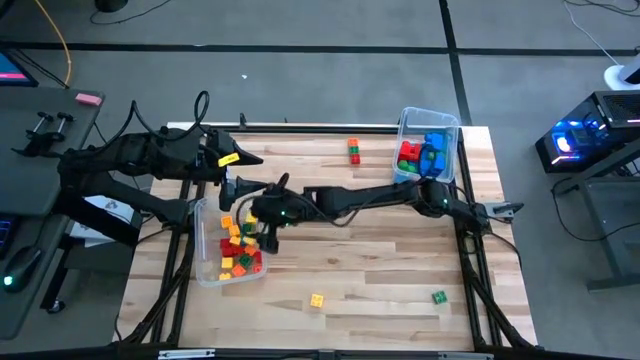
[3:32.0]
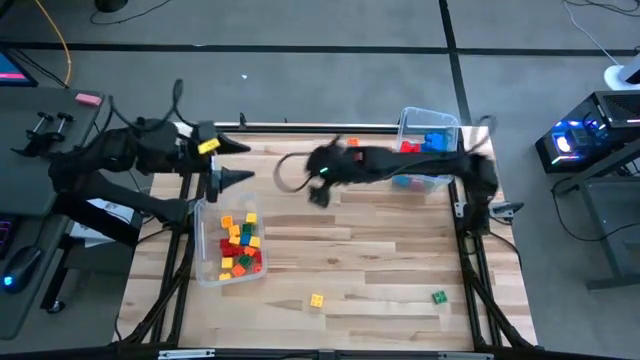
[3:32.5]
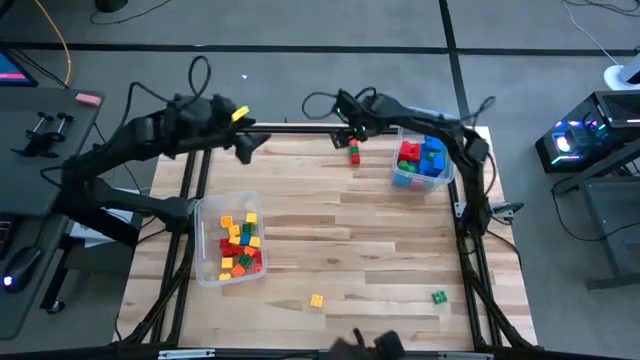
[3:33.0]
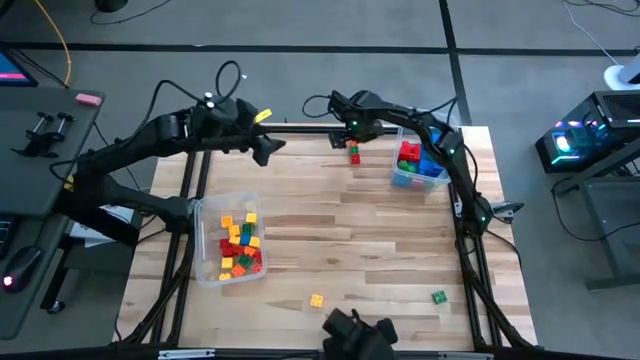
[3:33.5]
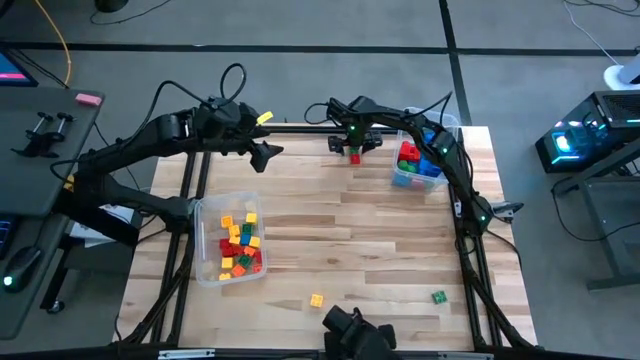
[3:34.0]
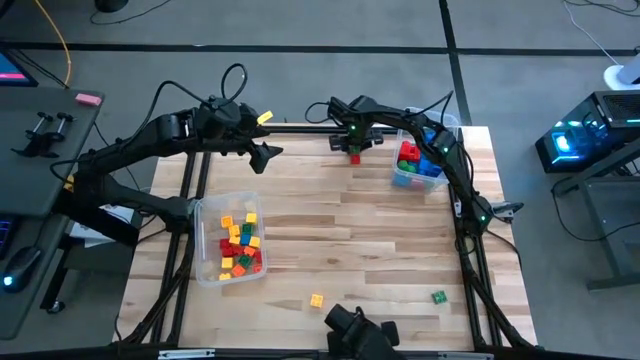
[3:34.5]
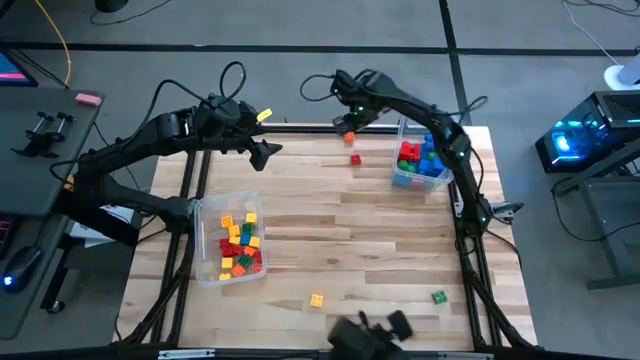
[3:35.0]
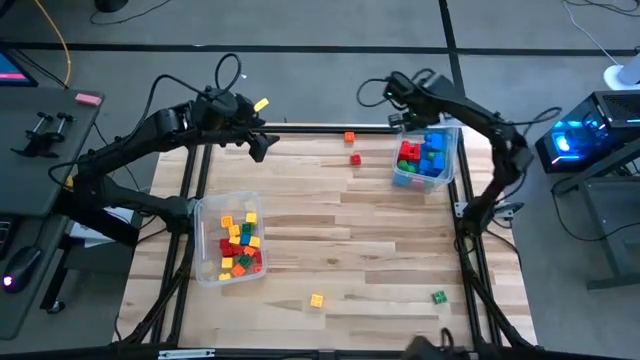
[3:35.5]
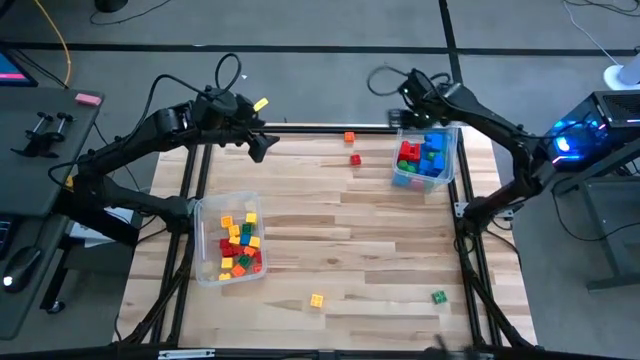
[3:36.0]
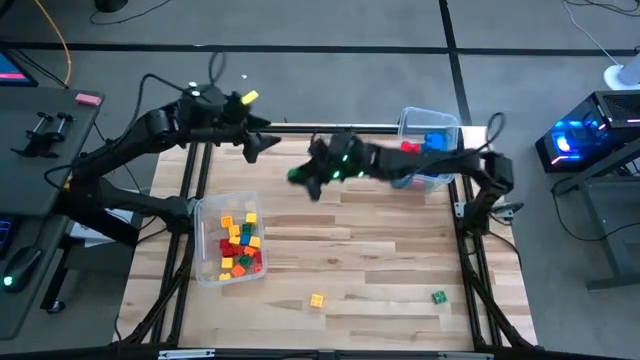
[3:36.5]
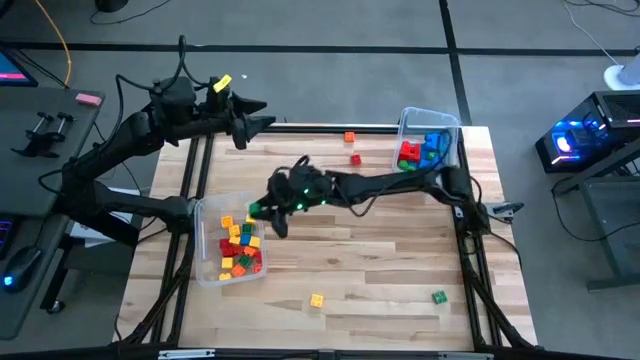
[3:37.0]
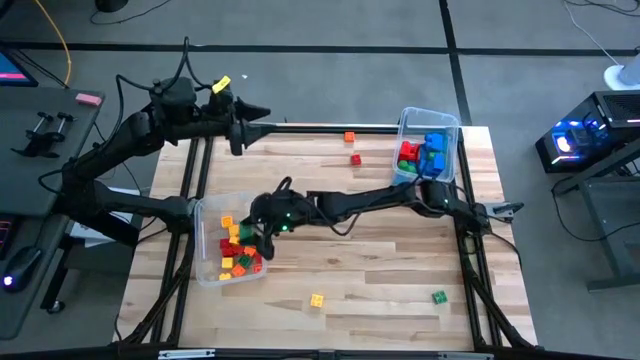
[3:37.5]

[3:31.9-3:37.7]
Task: Sort blocks by size
Put the small green game piece into the left transparent bin

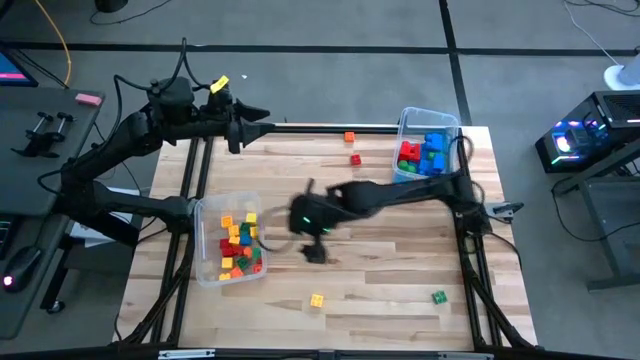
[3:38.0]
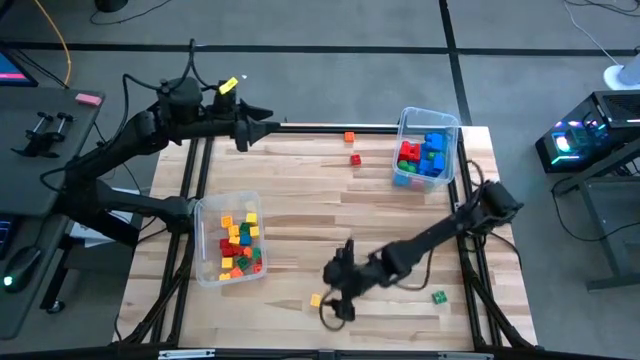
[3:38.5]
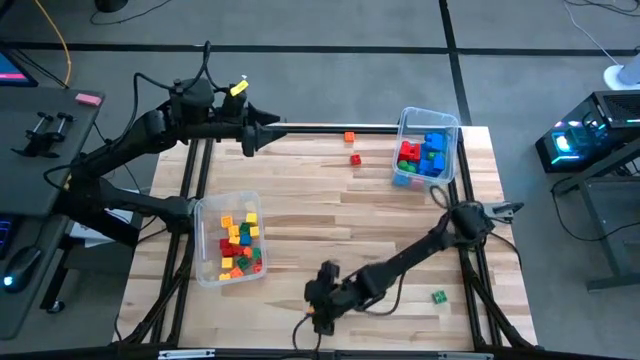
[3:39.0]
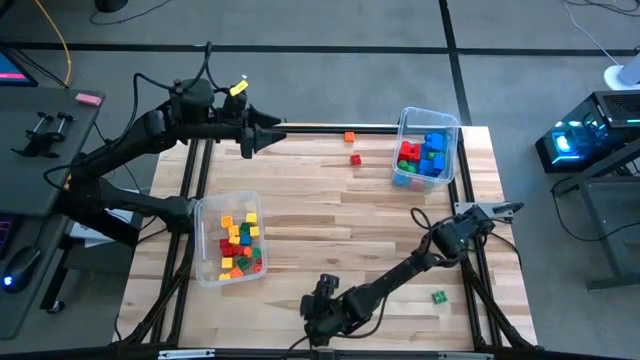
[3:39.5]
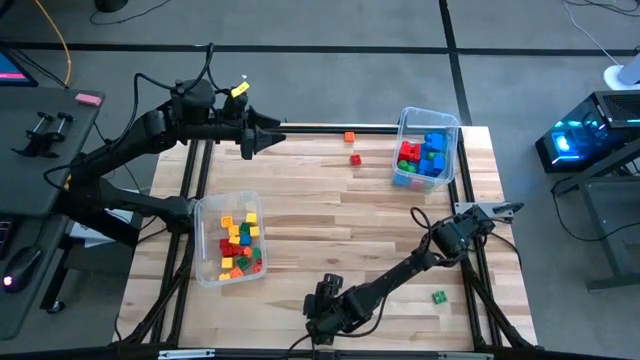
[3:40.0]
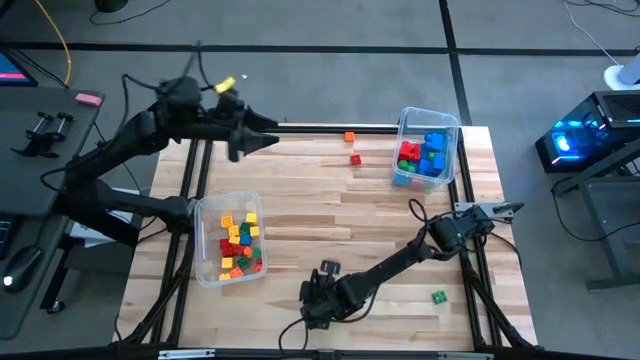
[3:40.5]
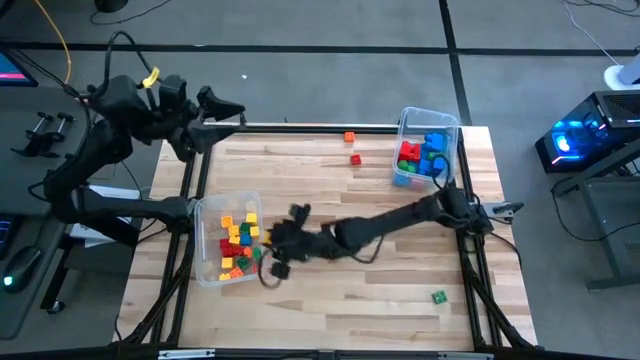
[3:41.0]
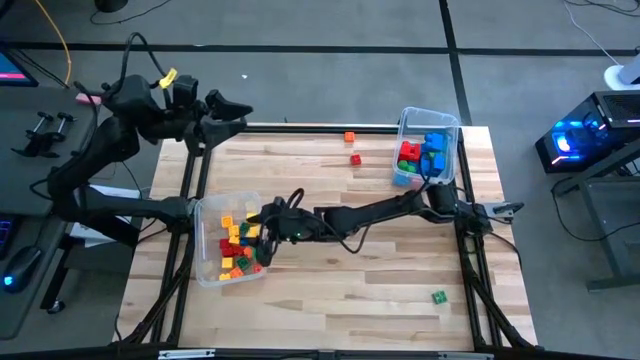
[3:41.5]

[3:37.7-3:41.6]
Put the small yellow game piece into the left transparent bin

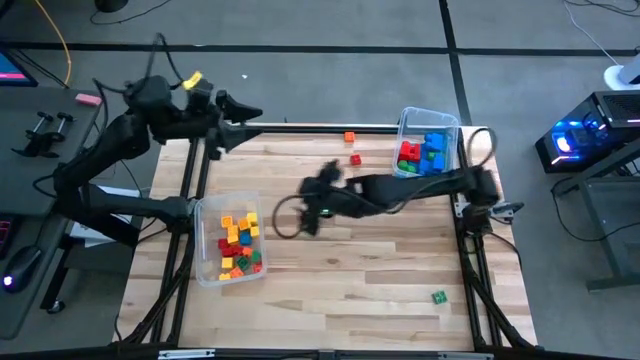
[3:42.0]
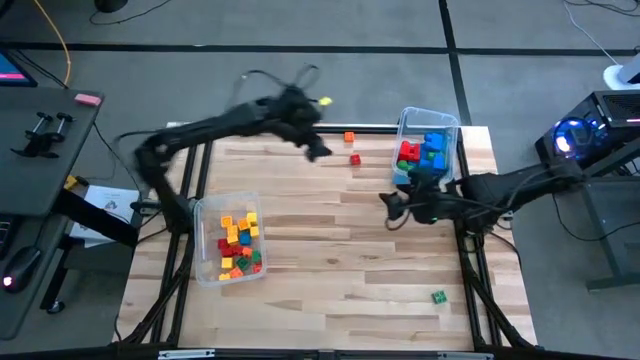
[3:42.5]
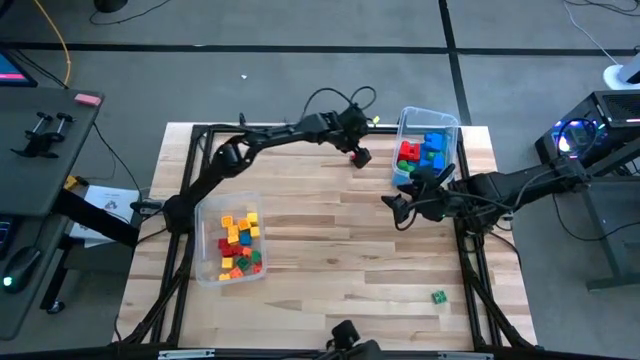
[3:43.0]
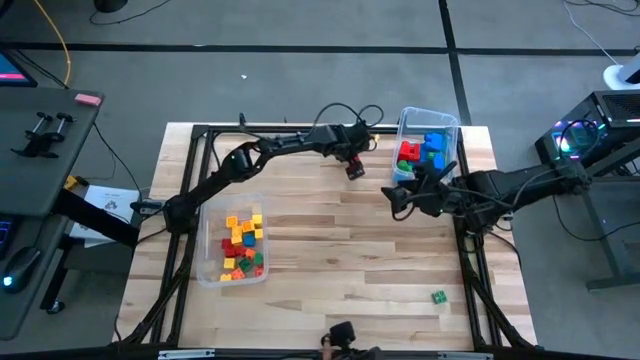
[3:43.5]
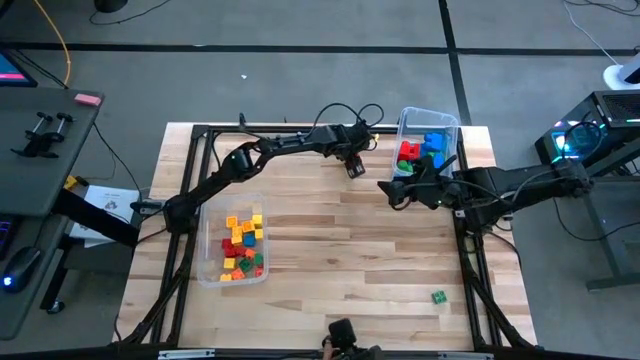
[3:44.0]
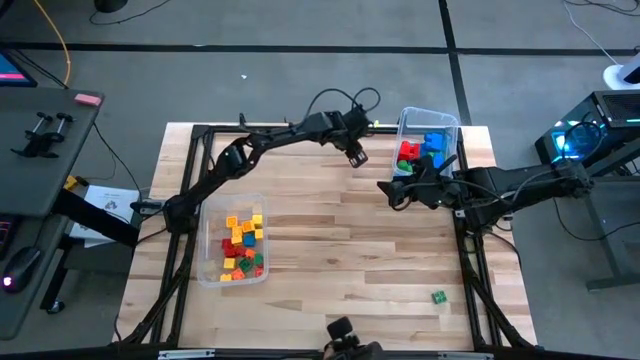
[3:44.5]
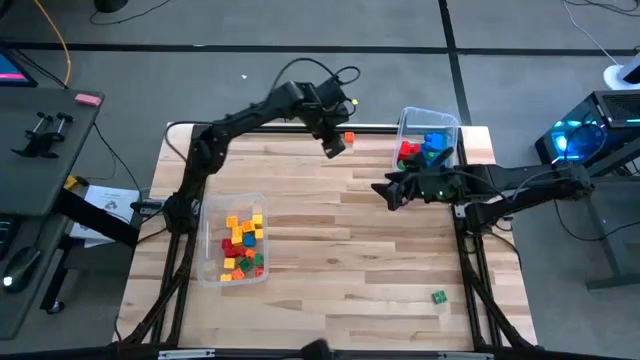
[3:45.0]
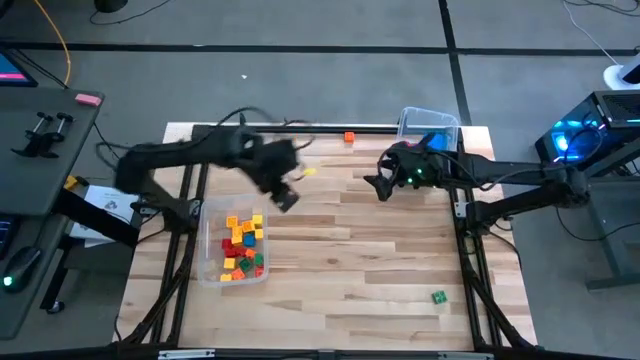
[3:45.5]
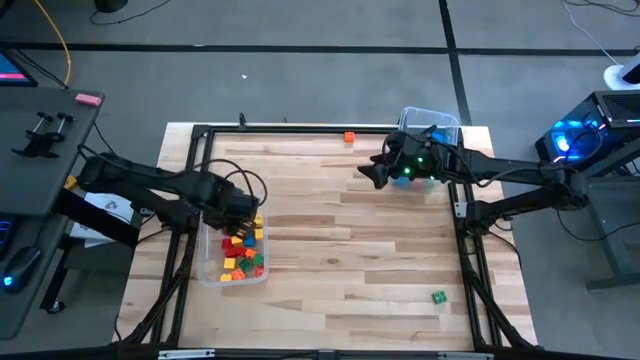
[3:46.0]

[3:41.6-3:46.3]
Put the small red game piece into the left transparent bin

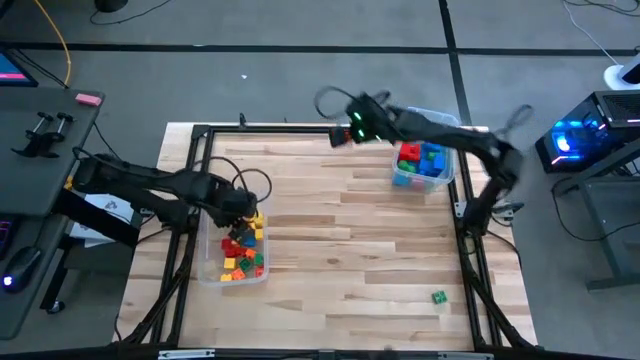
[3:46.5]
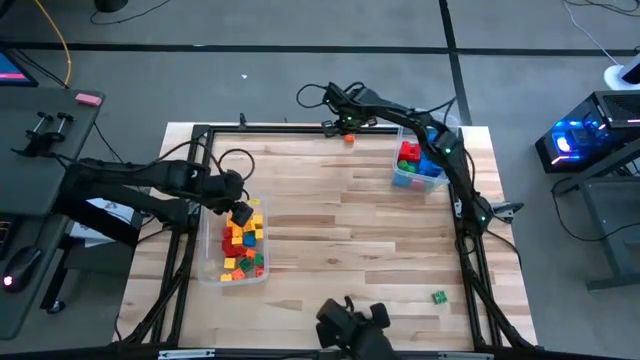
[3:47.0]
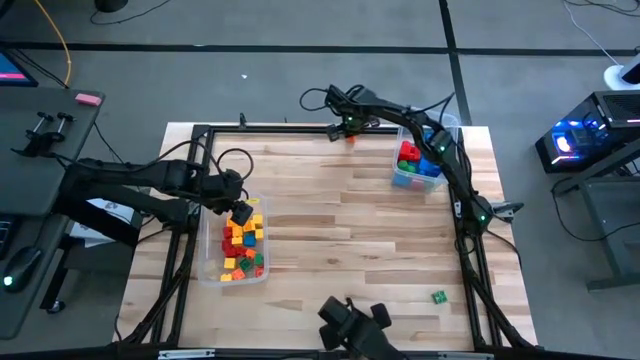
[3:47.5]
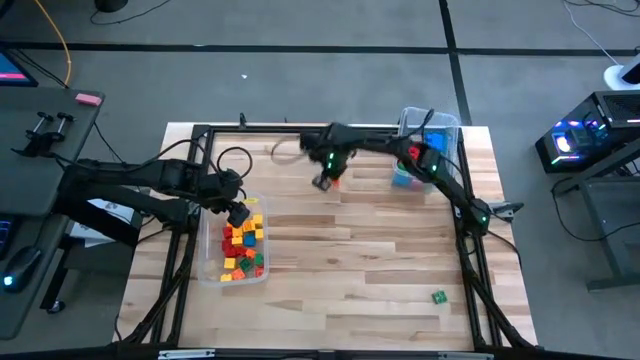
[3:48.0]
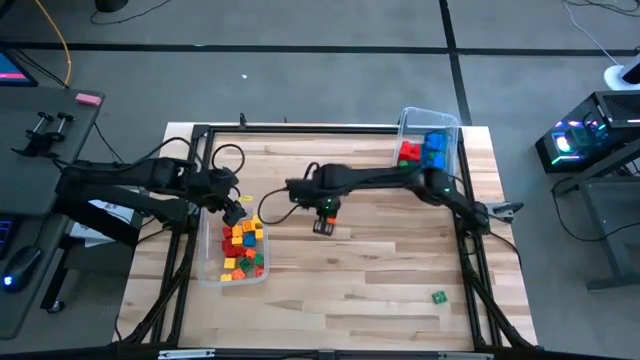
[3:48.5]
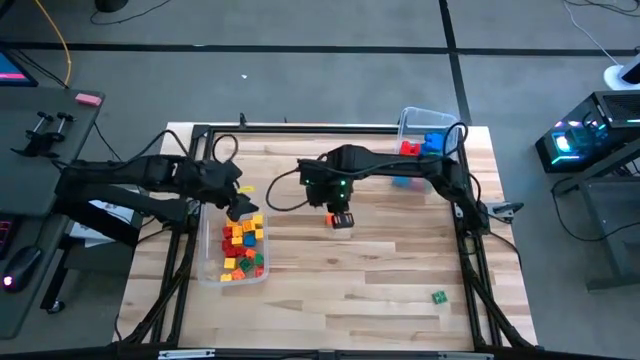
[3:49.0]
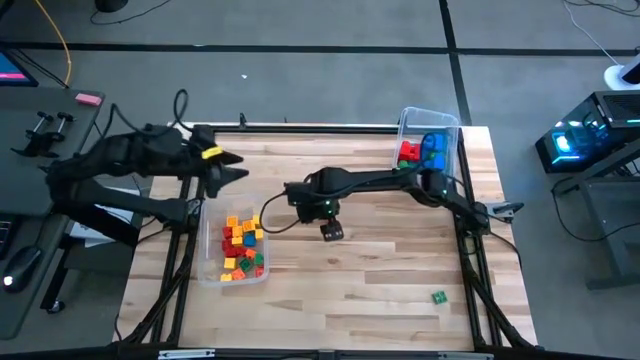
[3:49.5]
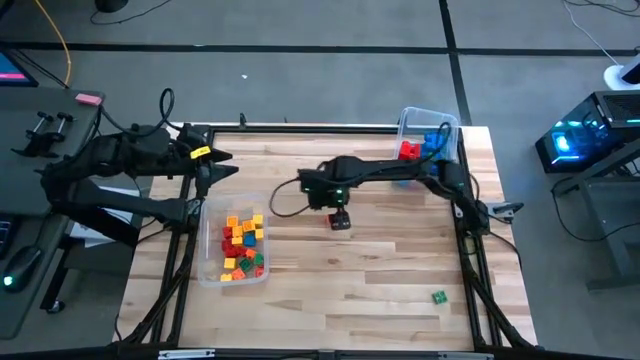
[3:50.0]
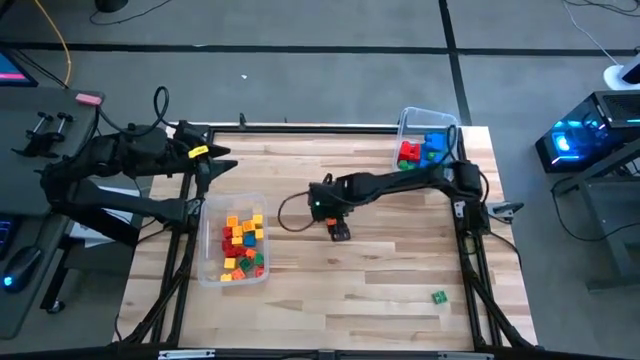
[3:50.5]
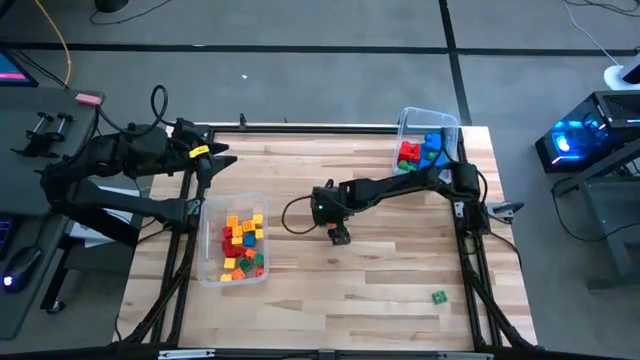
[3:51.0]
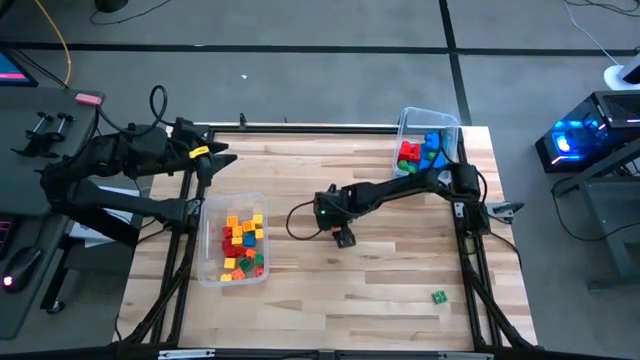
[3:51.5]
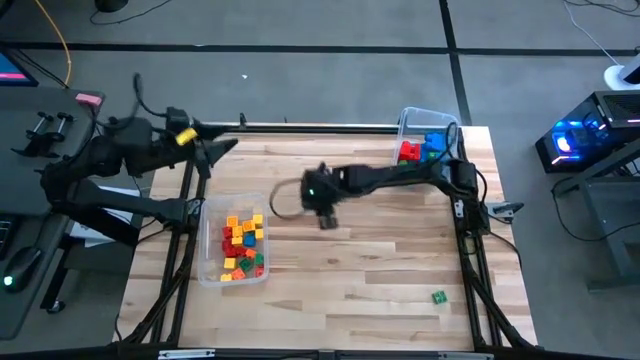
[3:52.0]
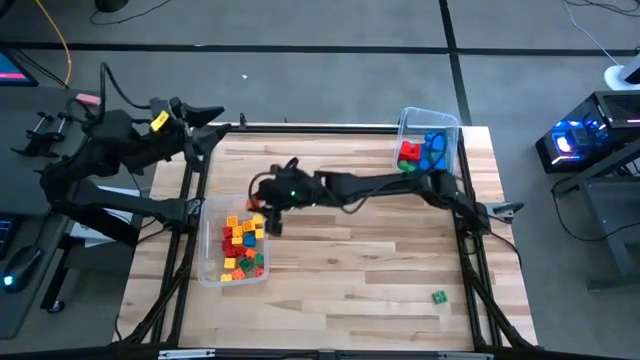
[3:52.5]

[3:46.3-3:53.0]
Put the small orange game piece into the left transparent bin
